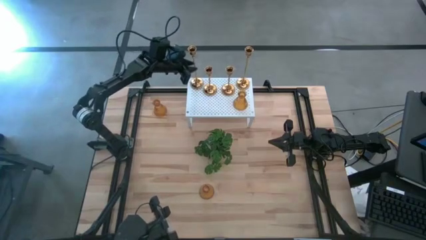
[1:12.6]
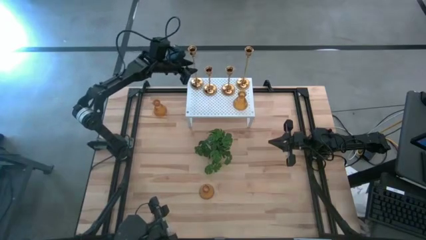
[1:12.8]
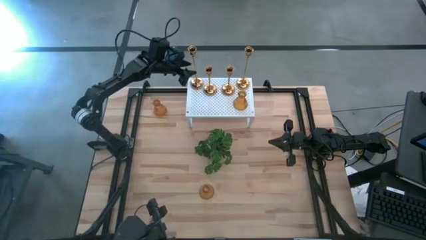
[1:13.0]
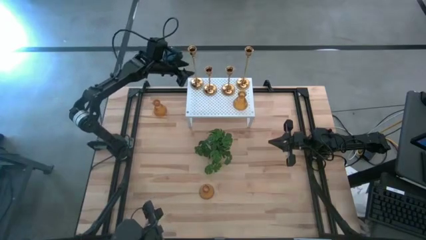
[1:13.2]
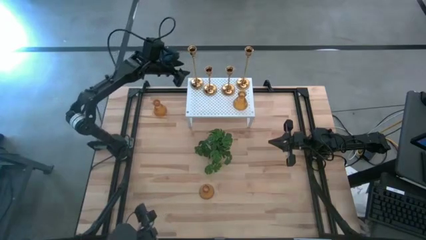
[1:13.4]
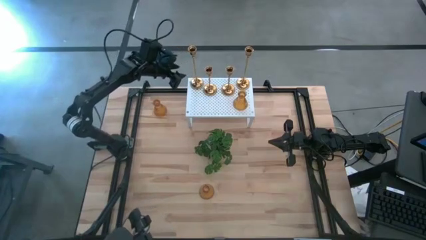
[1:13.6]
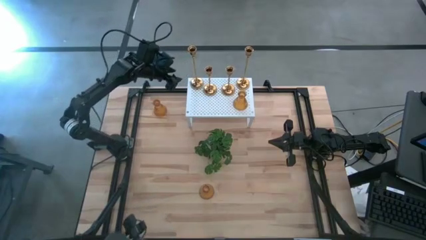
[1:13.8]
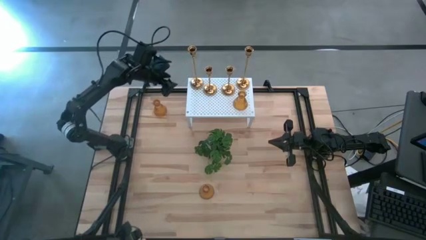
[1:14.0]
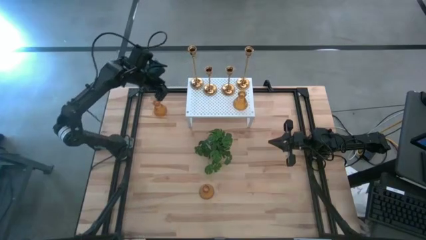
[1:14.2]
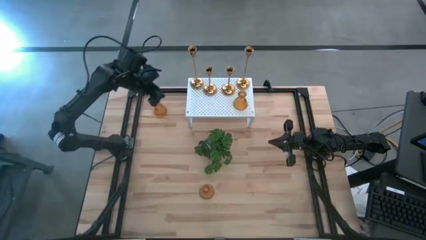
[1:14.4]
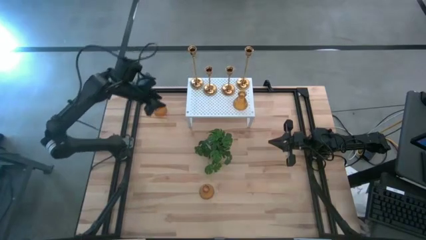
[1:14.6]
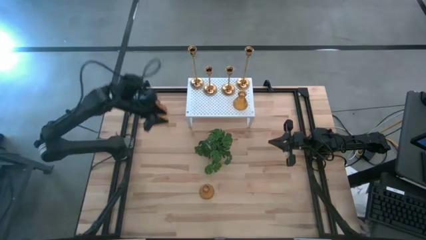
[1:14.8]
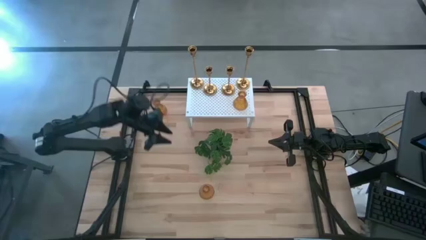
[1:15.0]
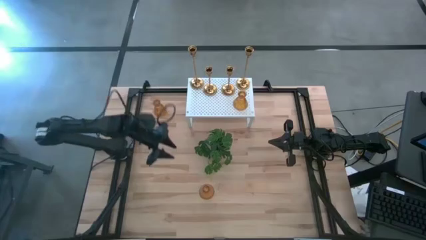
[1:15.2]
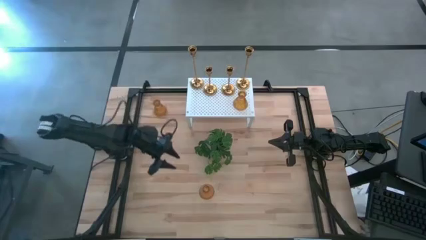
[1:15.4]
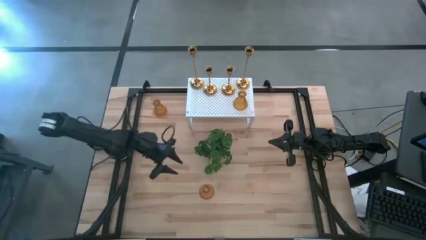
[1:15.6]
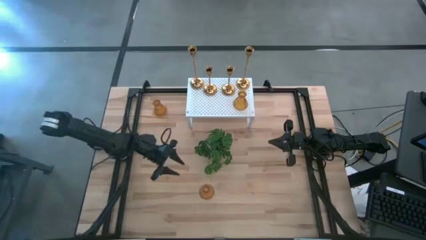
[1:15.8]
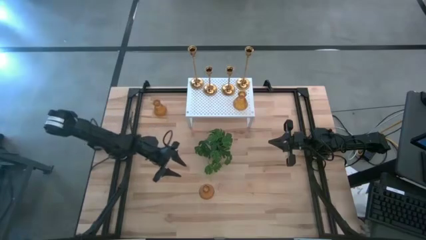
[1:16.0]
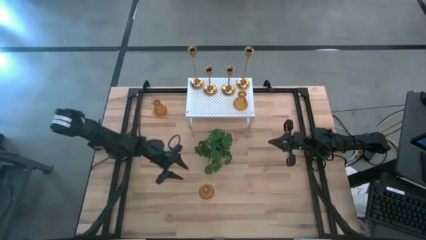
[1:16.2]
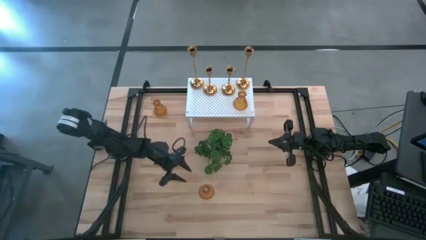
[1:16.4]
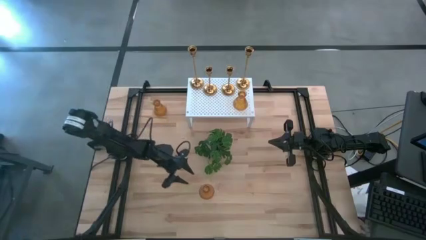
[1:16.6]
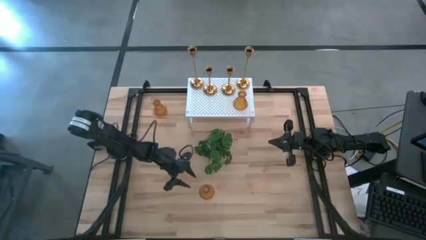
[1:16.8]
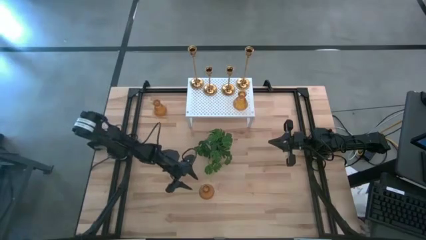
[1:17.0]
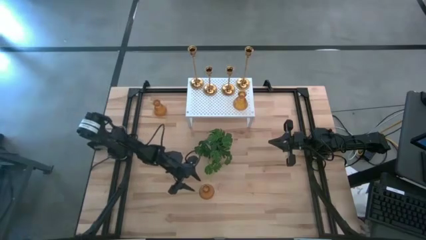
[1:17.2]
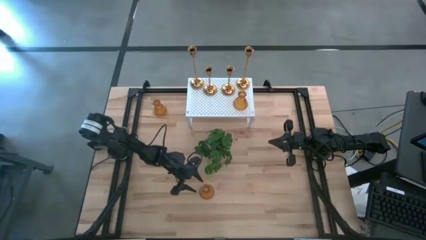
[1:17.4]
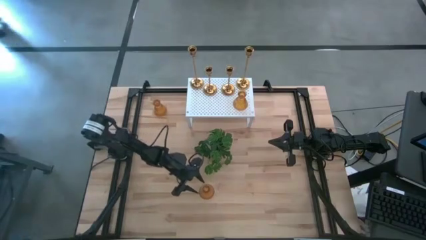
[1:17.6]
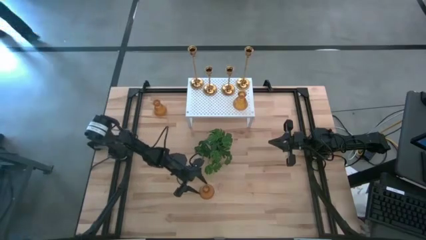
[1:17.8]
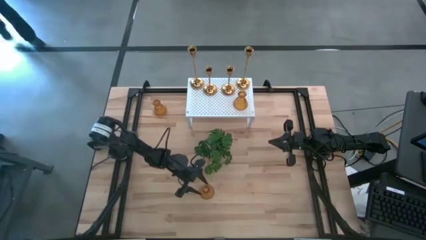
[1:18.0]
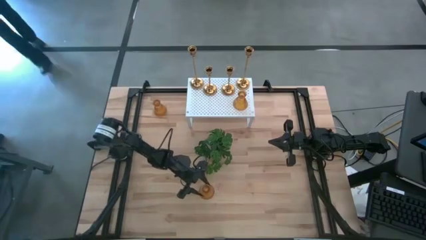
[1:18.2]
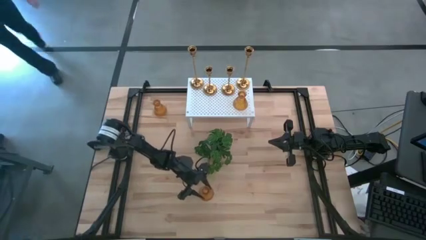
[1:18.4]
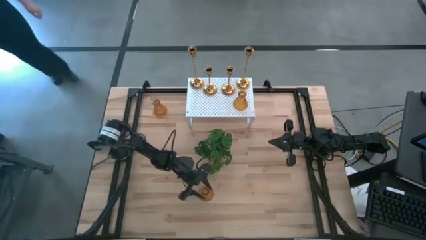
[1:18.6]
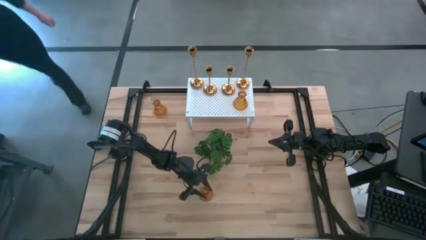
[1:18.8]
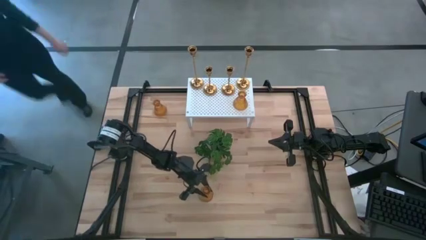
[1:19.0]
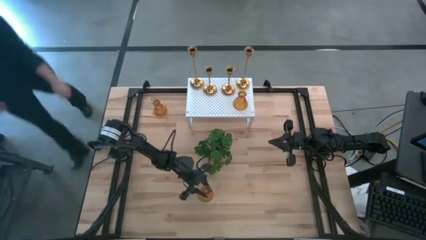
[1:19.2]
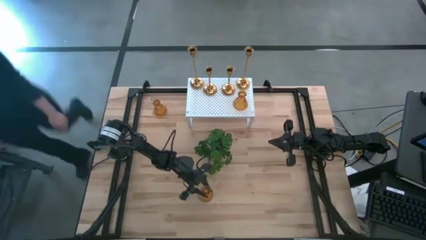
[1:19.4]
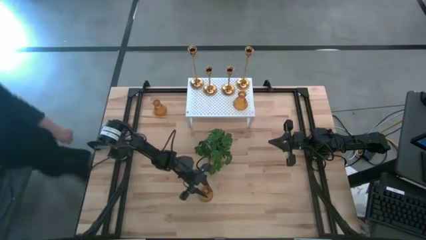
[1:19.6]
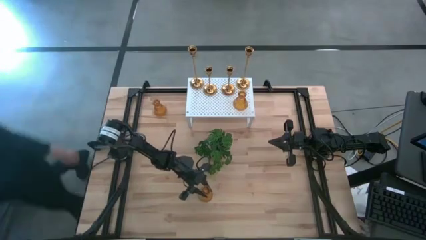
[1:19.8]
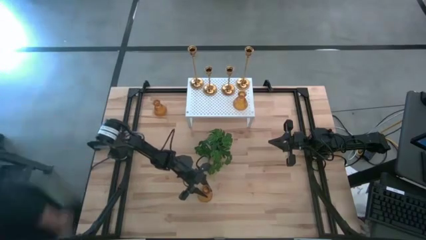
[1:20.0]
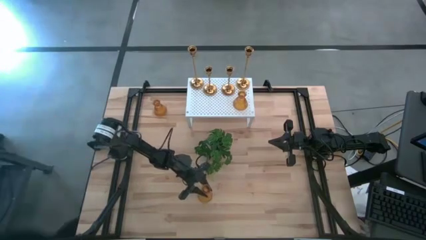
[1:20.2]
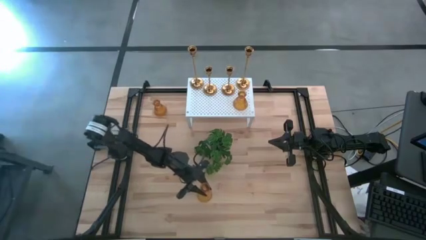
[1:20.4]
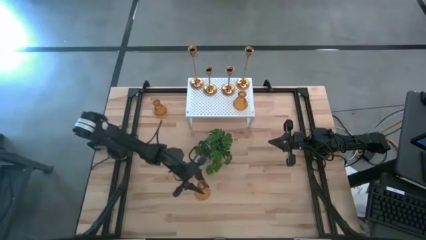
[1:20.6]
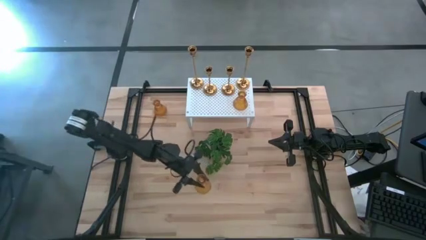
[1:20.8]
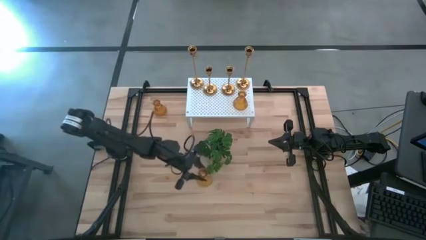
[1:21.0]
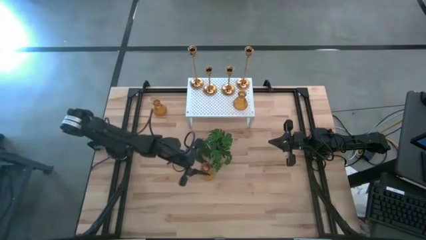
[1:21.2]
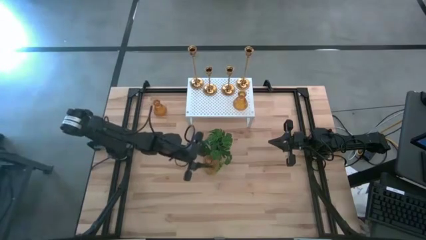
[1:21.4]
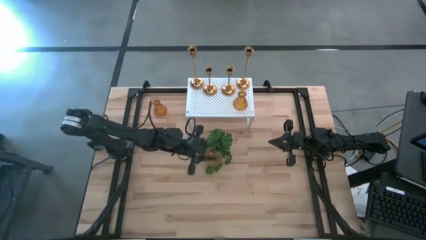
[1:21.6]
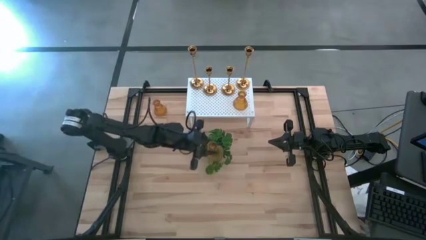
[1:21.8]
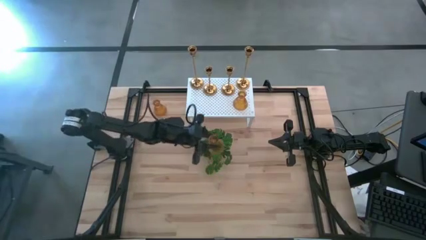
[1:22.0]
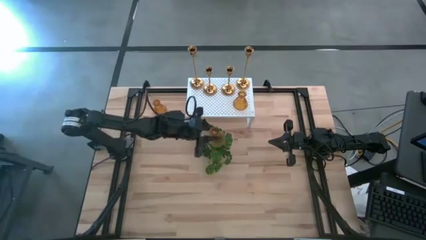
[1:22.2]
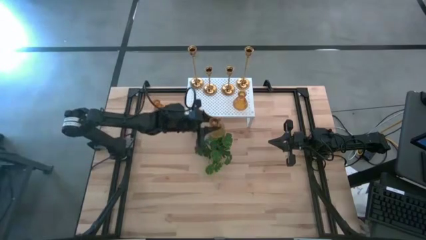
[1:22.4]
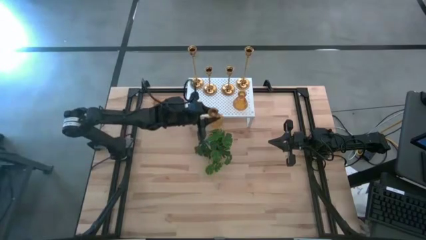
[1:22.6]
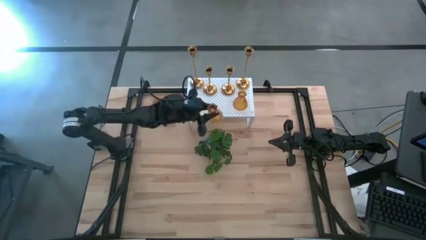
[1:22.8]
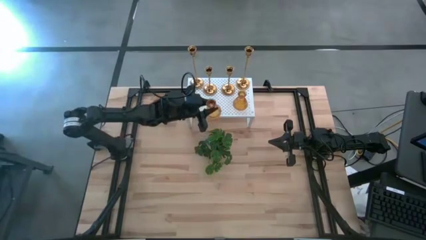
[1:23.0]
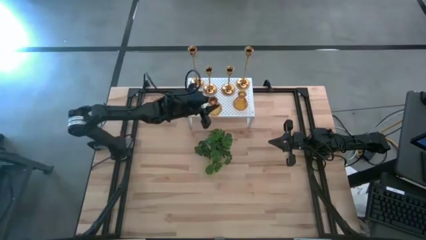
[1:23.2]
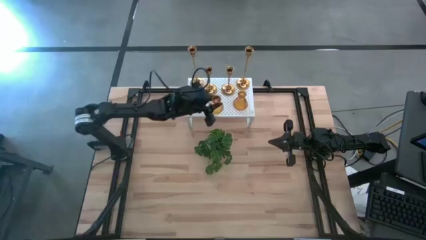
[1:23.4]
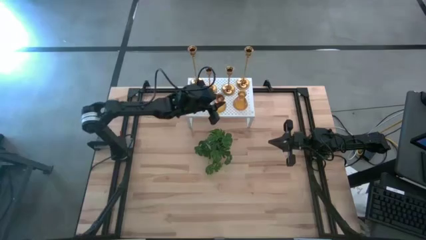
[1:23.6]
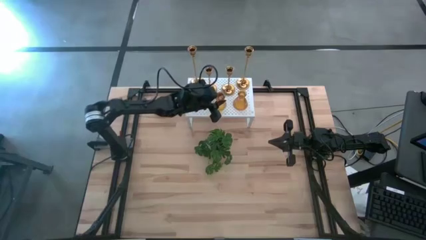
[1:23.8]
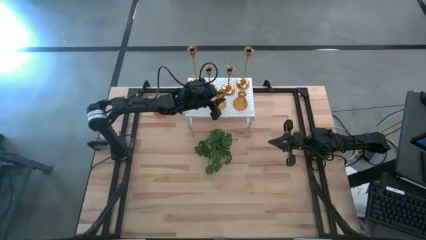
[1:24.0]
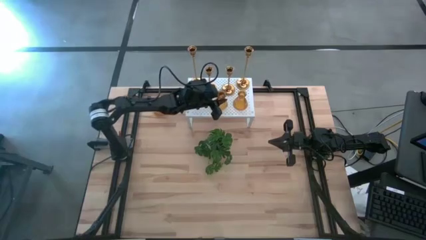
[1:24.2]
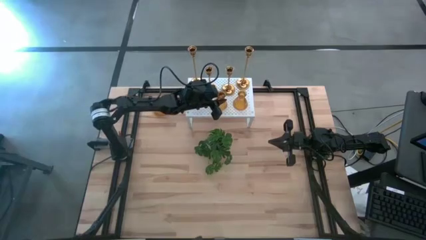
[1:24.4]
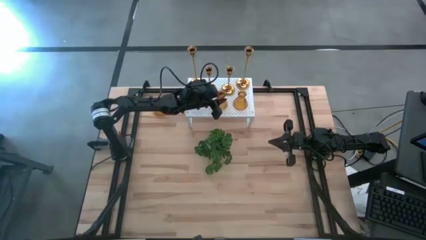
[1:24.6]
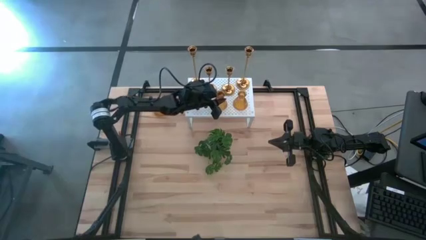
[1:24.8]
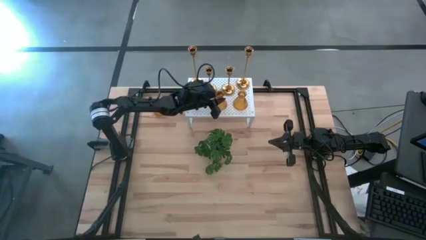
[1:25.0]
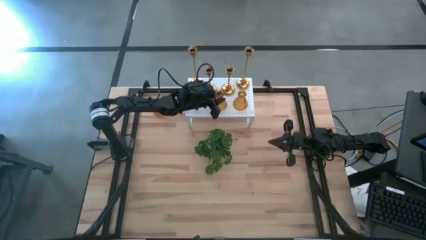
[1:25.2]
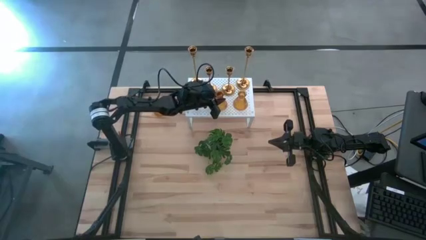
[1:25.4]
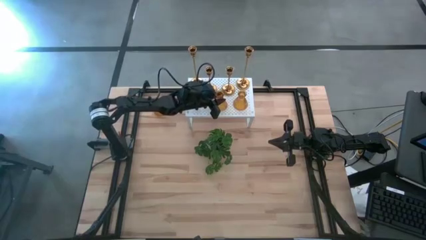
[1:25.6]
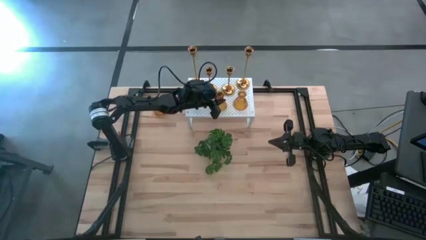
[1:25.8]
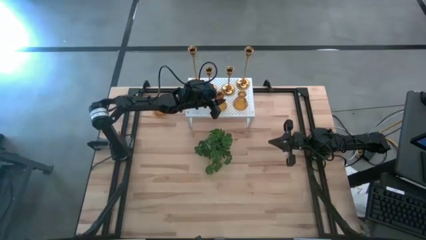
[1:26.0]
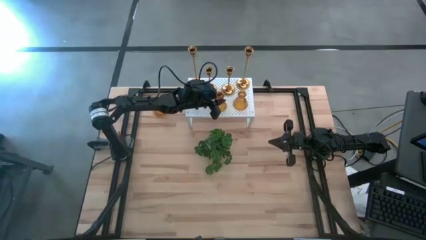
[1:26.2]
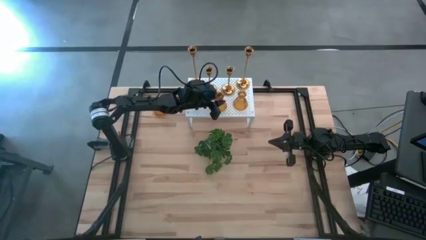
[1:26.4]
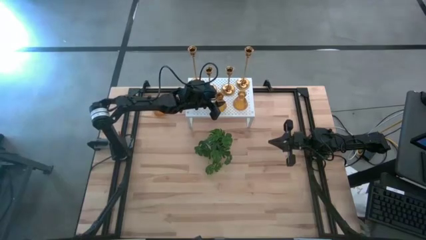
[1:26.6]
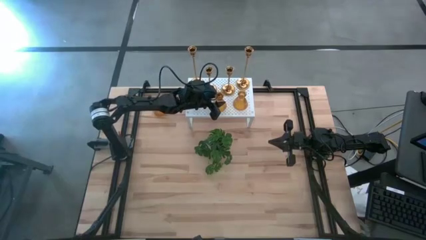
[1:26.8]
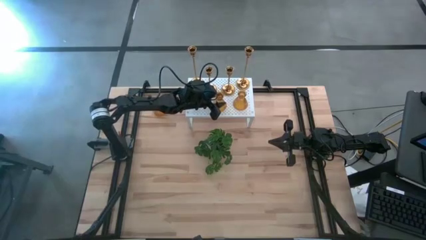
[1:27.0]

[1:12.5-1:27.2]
Task: Pick & Place candle stick holders
Align the bottom yellow glass candle holder with the other yellow glass candle holder on the shelf
